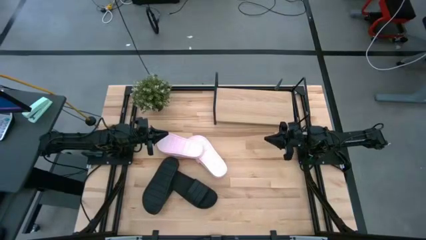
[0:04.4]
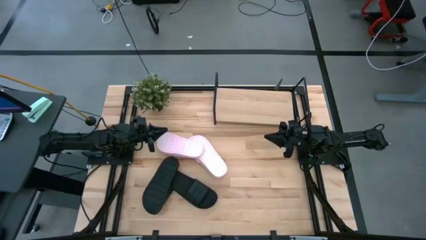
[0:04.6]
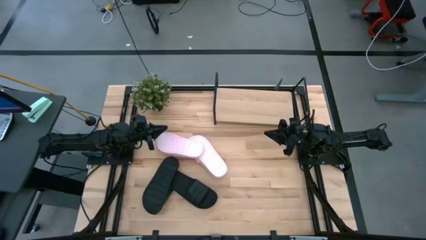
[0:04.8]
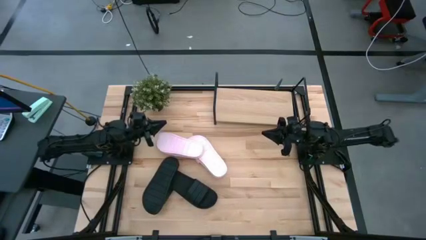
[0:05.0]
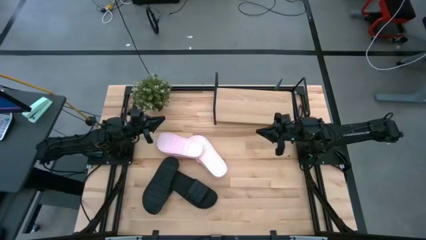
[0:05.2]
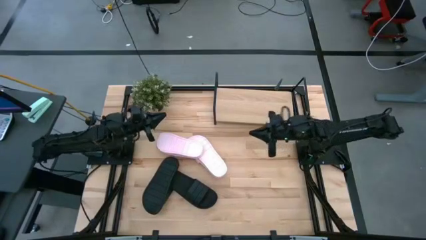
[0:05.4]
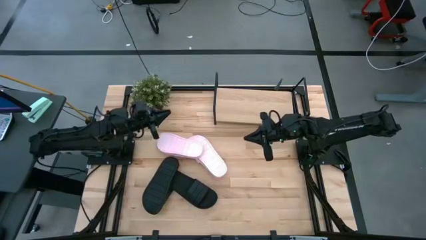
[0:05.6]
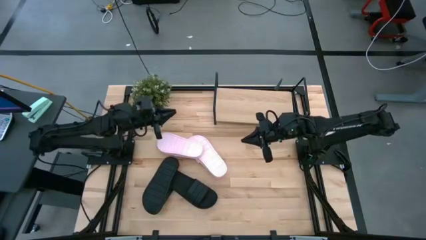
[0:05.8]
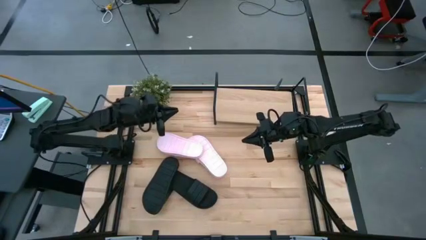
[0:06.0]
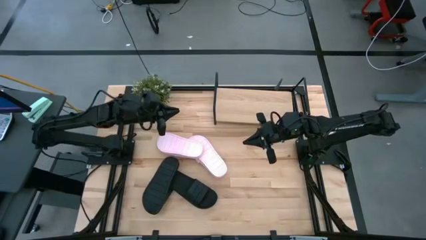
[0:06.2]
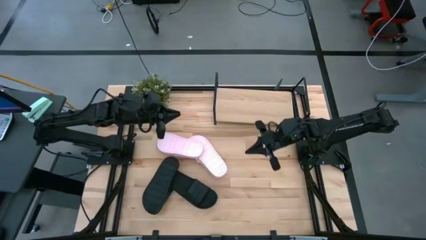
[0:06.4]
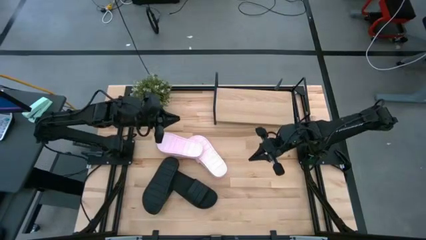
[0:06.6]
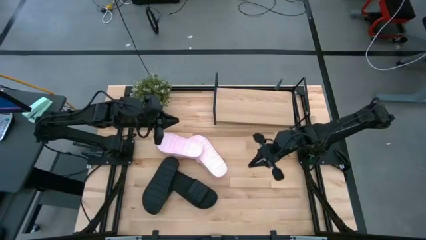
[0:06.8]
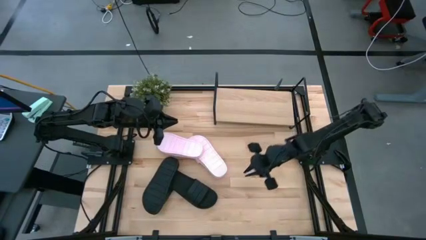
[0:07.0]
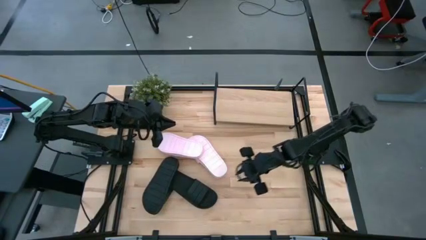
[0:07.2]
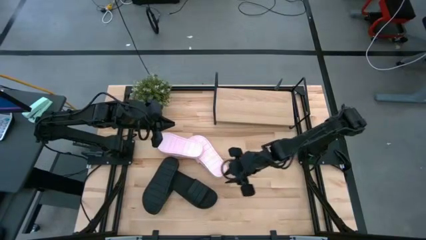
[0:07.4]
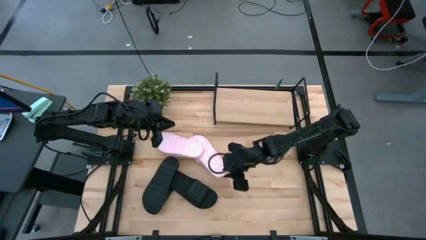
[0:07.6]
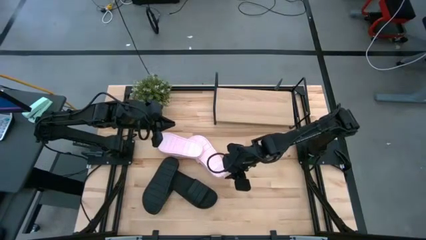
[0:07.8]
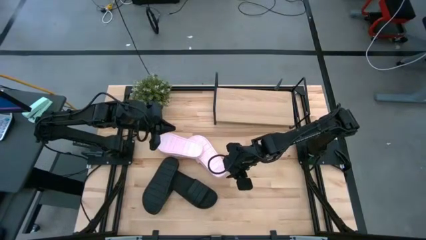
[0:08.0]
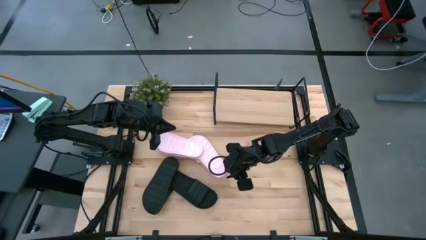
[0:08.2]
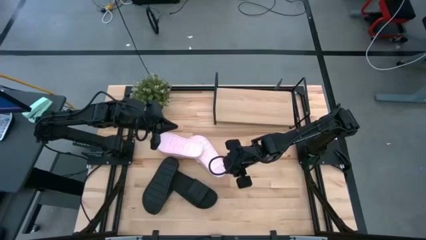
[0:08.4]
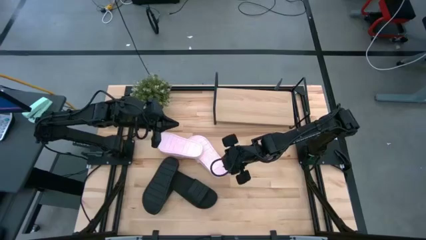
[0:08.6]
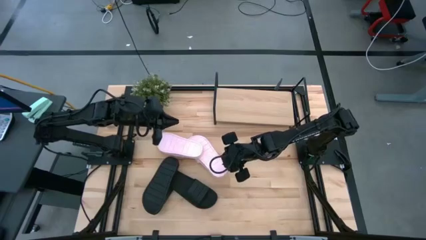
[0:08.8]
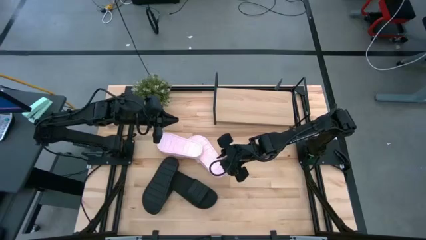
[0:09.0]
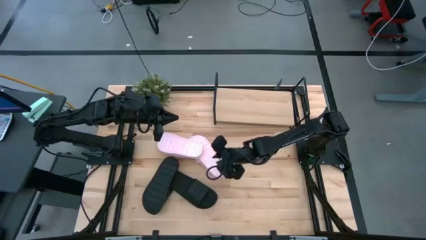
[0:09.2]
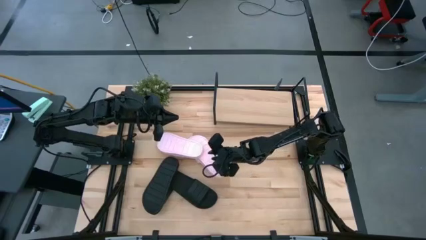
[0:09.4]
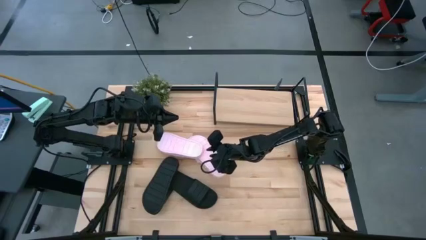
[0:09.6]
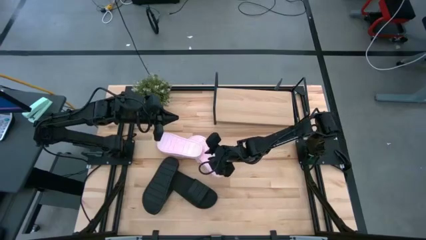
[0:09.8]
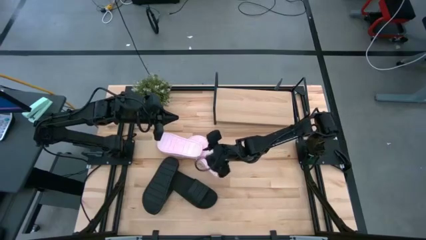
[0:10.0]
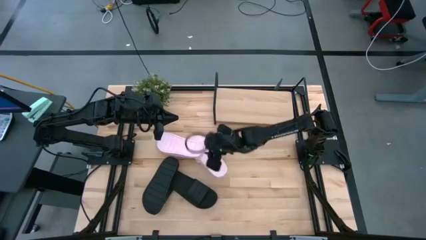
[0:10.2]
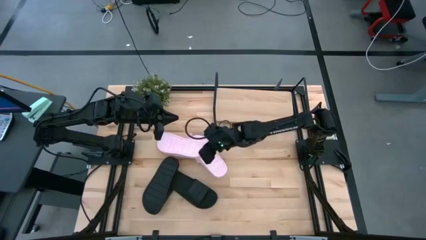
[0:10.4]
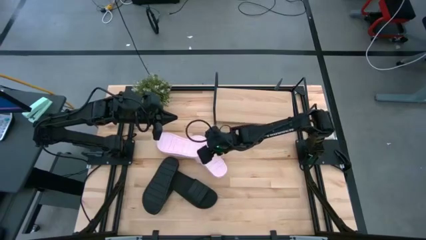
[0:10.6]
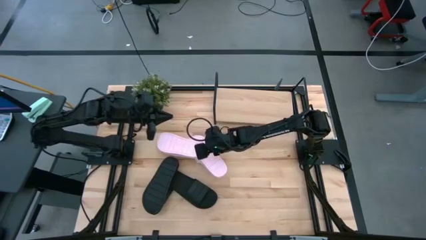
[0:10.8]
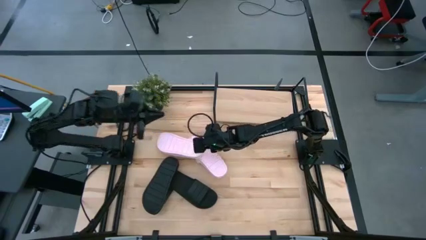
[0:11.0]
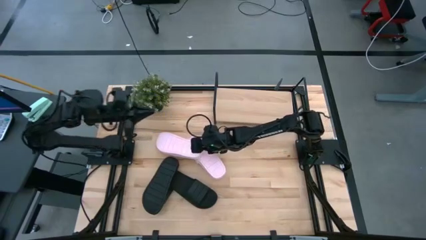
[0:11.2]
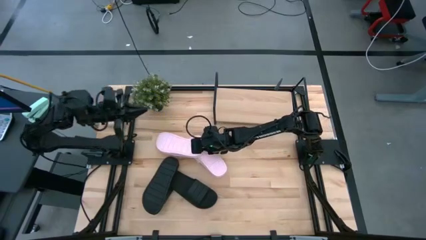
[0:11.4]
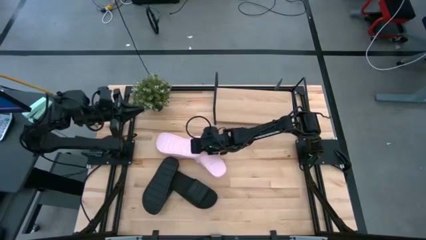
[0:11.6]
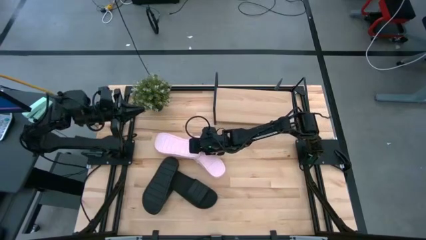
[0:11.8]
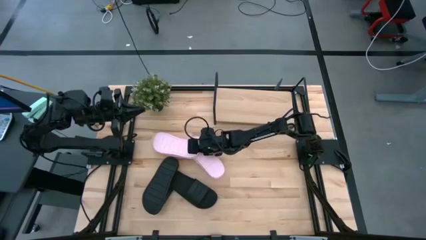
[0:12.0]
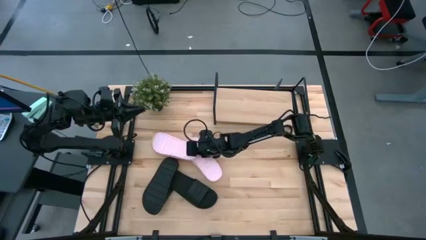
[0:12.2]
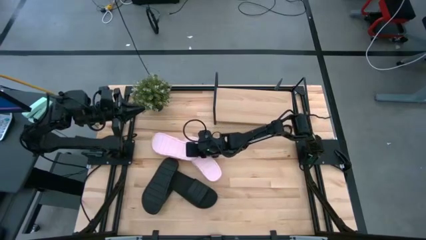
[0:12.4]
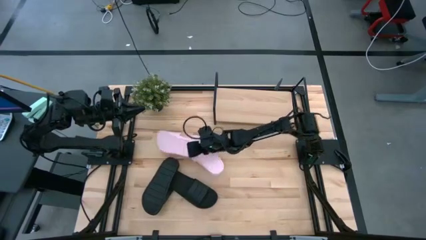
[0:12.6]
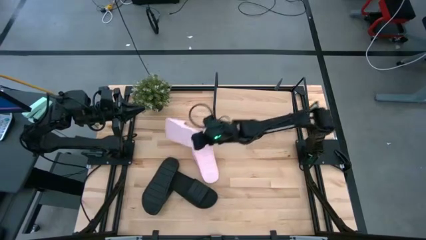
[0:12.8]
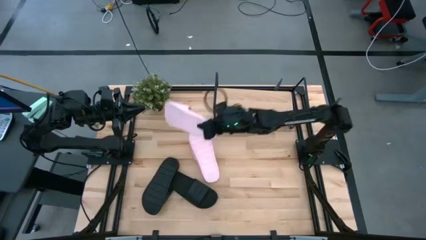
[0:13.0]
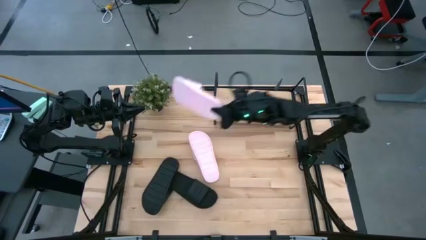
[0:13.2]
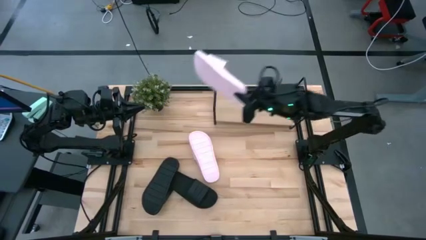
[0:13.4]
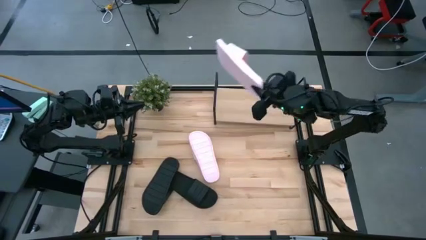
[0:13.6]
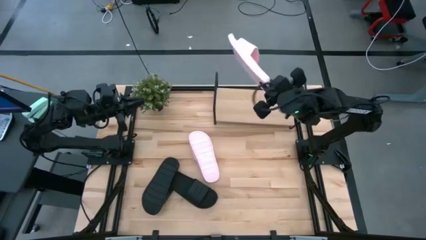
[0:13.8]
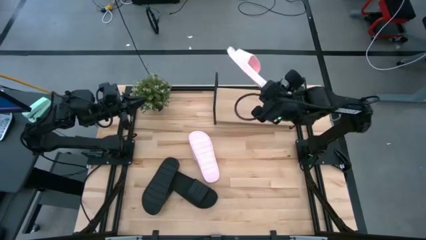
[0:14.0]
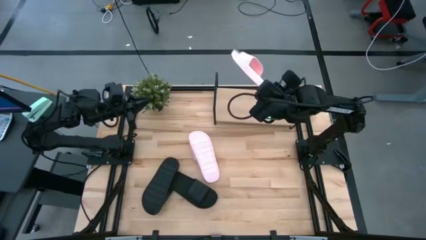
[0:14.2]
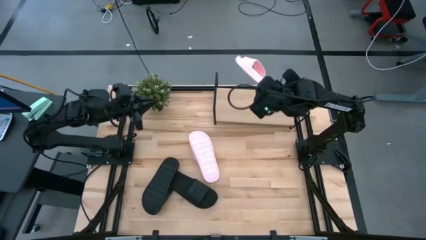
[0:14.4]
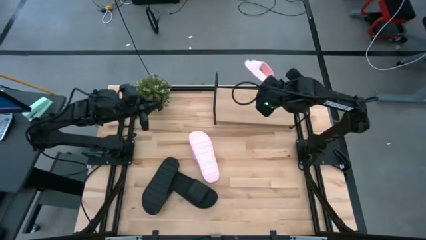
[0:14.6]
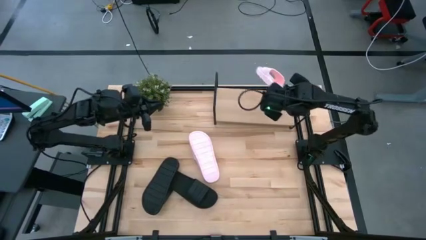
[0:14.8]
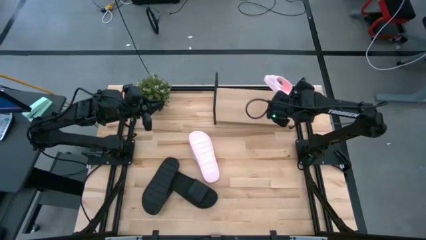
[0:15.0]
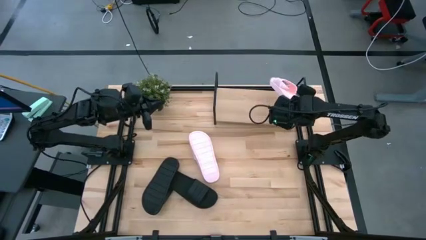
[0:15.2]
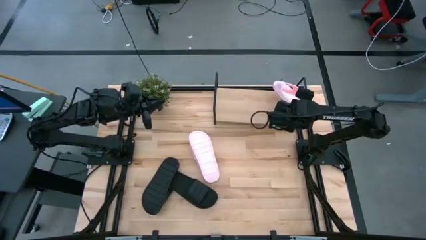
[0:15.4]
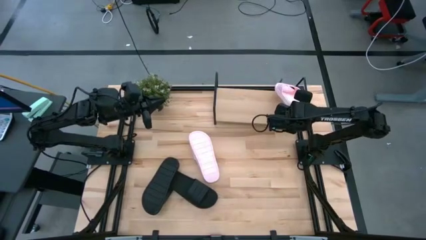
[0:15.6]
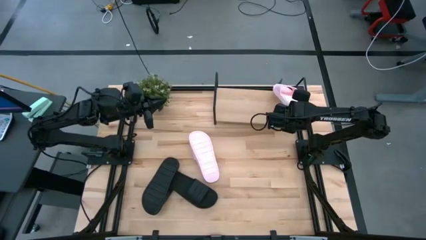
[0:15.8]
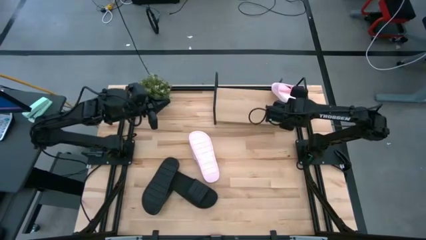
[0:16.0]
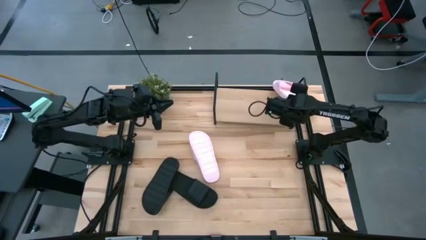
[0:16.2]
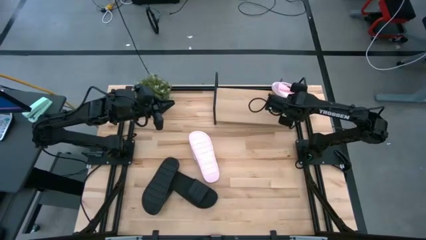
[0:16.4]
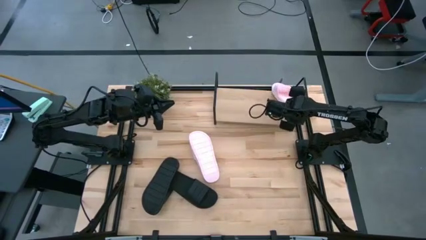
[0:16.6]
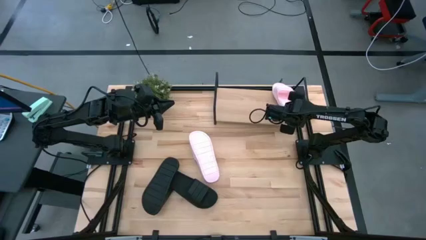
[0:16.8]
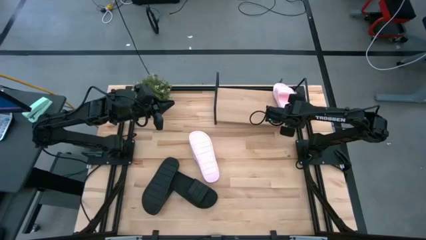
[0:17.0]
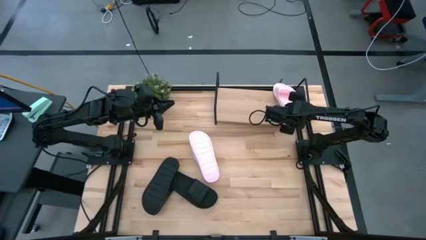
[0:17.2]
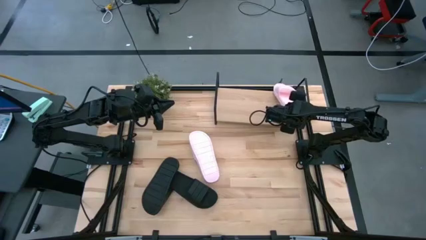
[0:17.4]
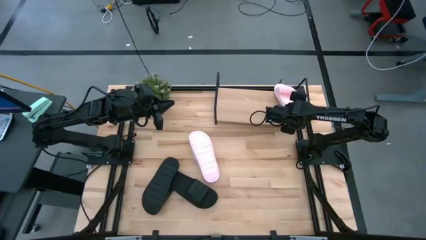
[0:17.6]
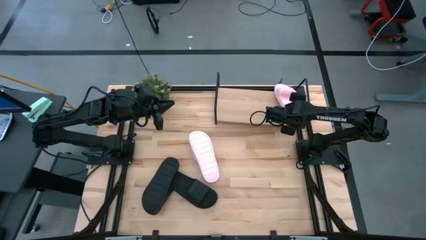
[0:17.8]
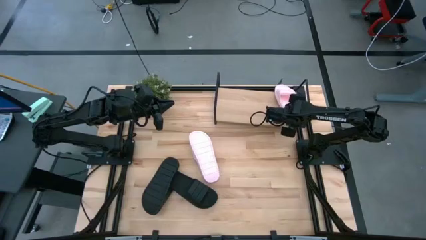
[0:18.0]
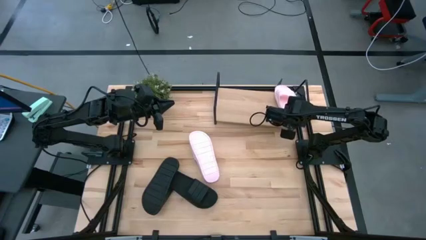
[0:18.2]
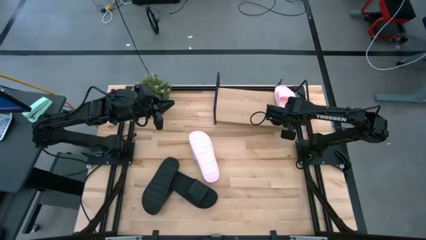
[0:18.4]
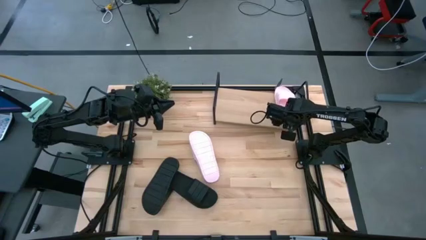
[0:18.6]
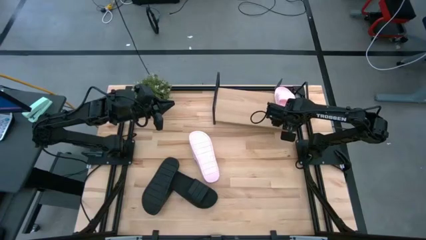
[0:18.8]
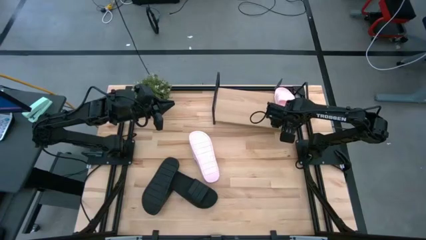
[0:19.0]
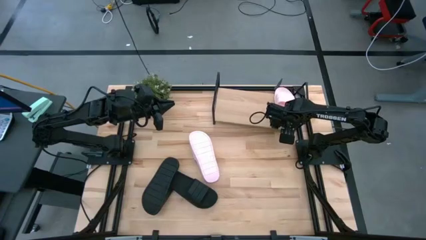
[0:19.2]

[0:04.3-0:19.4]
Task: Pick and place slides into the shelf
Put the left pink slide on the shelf
